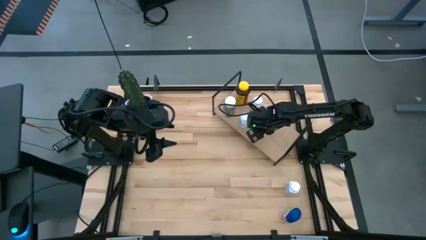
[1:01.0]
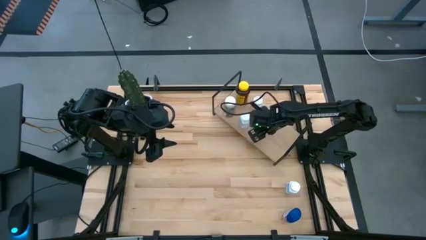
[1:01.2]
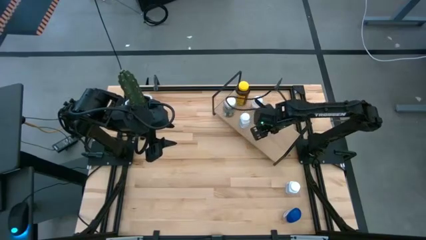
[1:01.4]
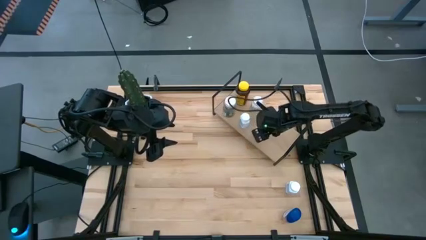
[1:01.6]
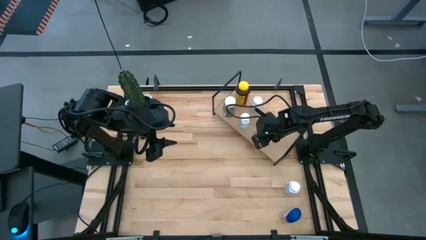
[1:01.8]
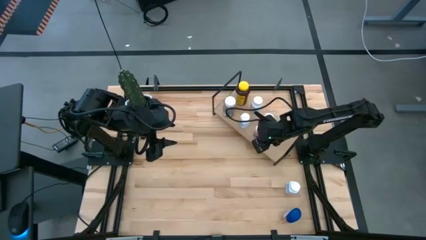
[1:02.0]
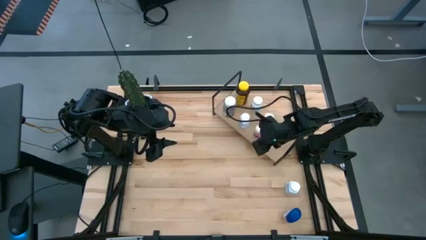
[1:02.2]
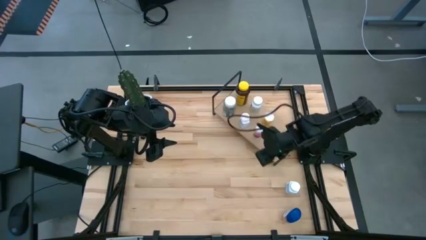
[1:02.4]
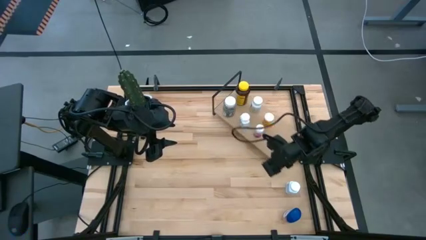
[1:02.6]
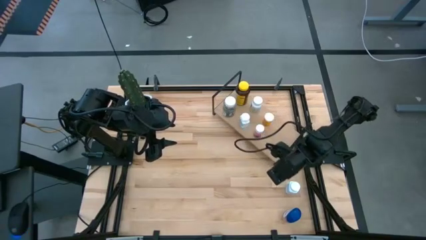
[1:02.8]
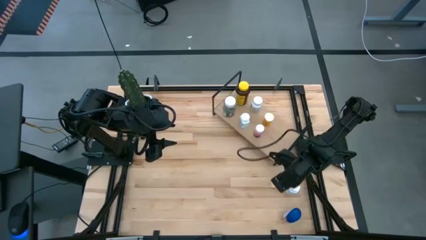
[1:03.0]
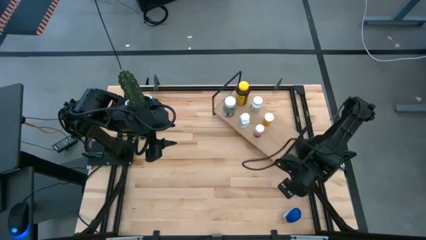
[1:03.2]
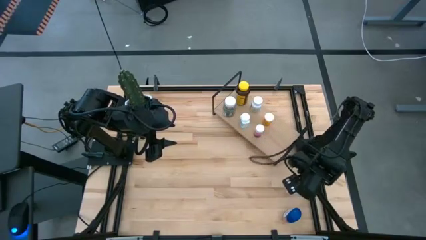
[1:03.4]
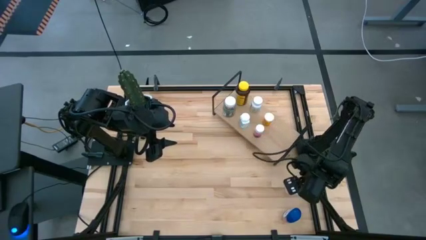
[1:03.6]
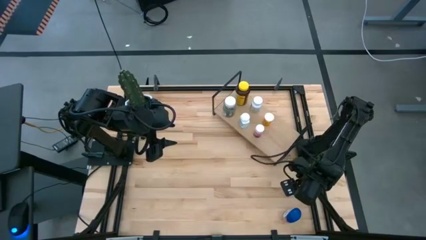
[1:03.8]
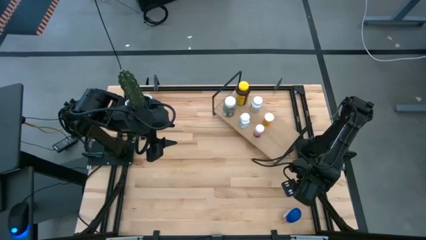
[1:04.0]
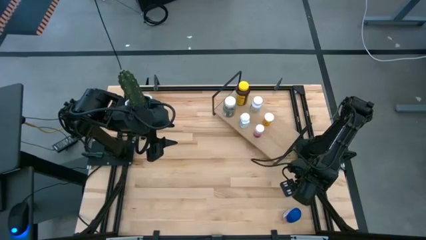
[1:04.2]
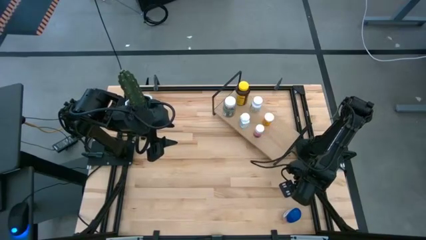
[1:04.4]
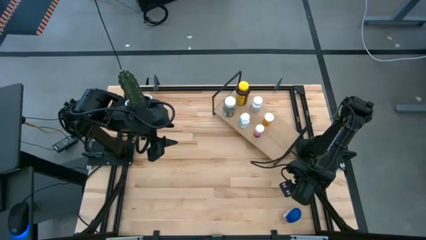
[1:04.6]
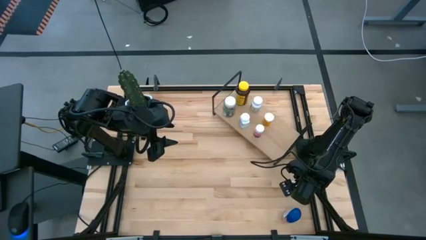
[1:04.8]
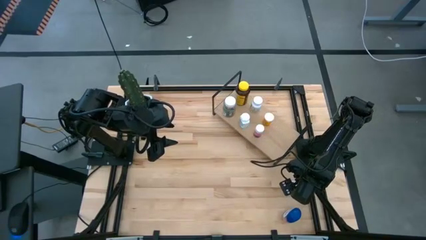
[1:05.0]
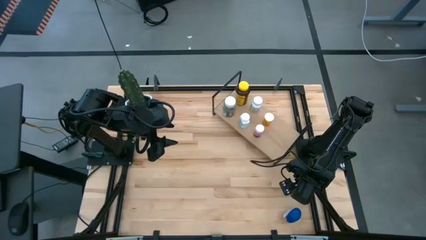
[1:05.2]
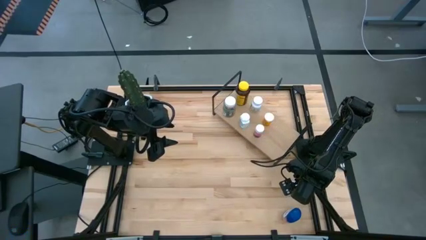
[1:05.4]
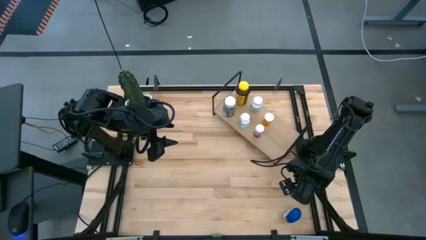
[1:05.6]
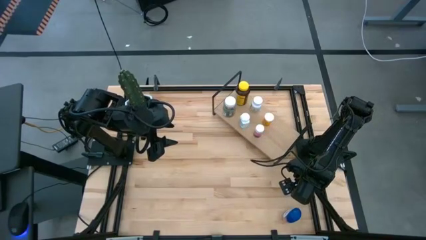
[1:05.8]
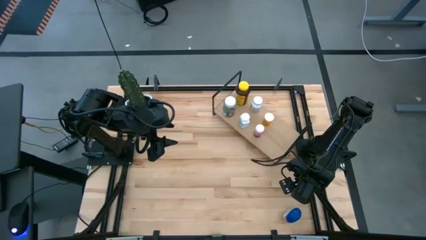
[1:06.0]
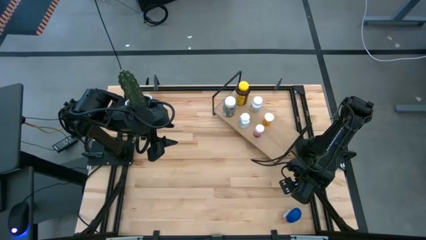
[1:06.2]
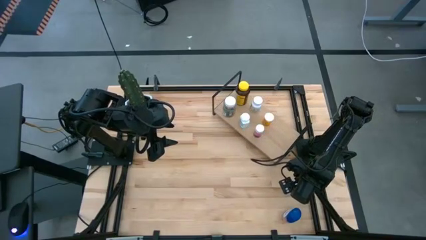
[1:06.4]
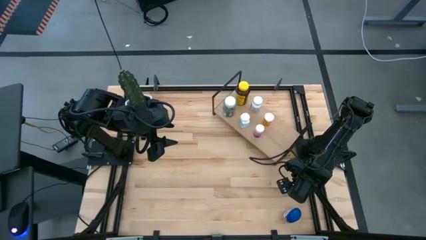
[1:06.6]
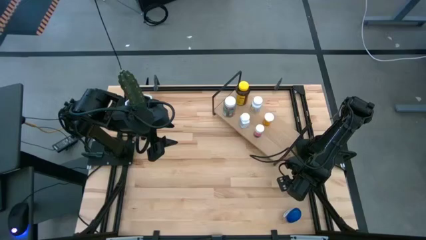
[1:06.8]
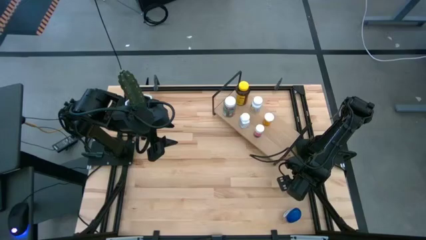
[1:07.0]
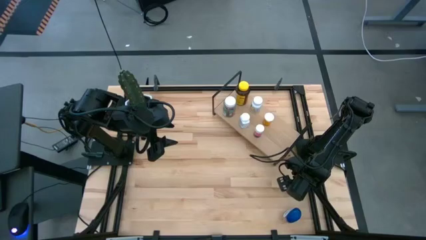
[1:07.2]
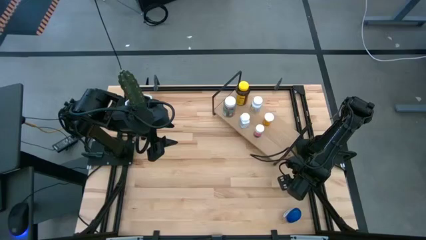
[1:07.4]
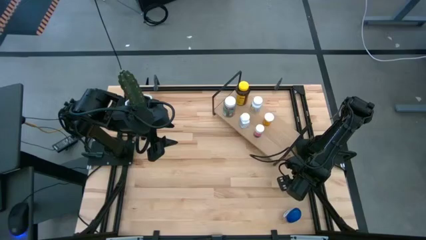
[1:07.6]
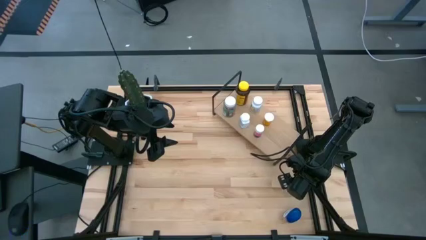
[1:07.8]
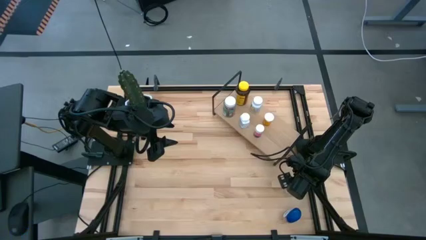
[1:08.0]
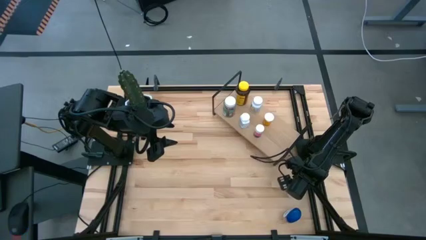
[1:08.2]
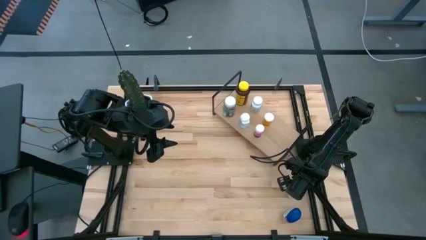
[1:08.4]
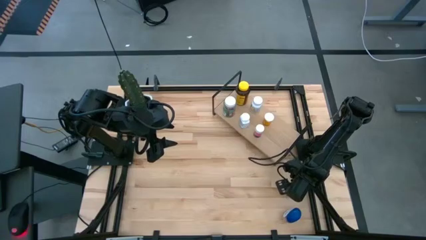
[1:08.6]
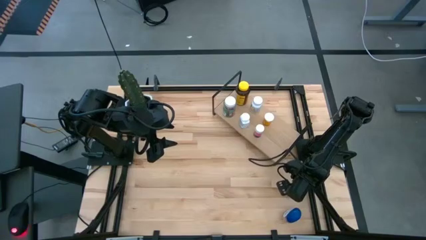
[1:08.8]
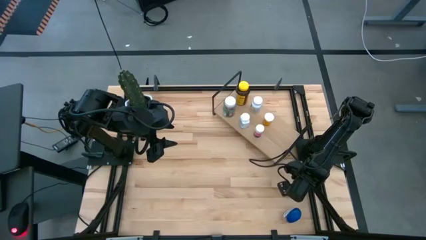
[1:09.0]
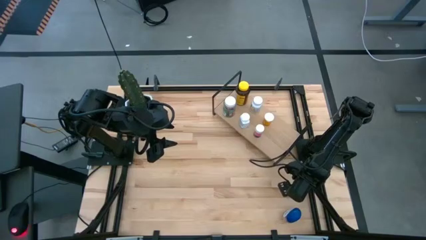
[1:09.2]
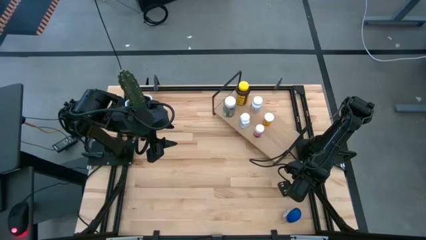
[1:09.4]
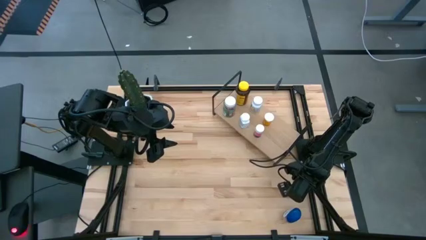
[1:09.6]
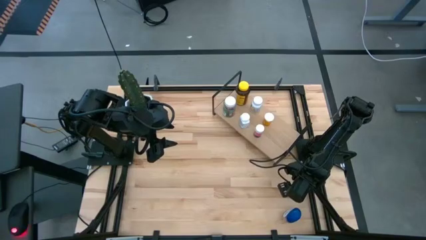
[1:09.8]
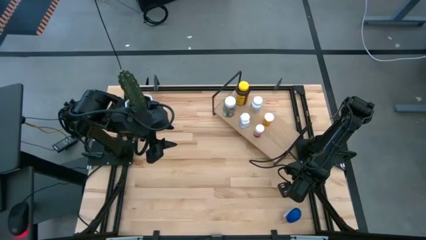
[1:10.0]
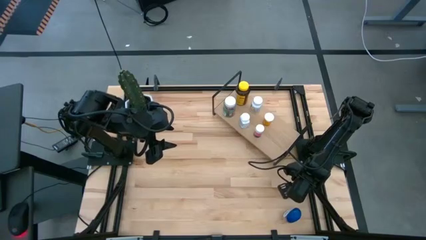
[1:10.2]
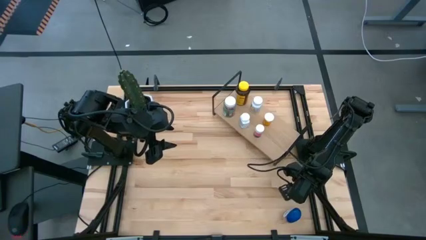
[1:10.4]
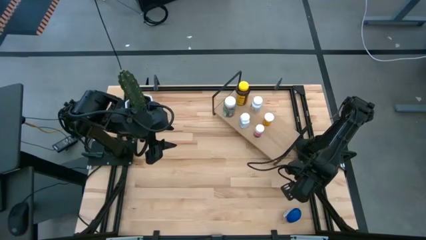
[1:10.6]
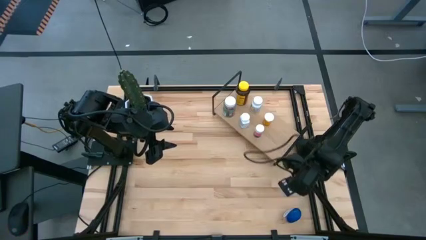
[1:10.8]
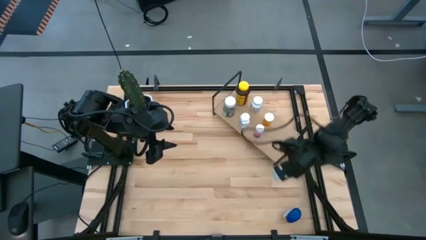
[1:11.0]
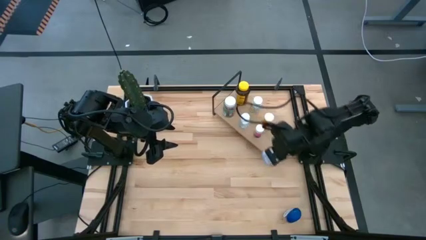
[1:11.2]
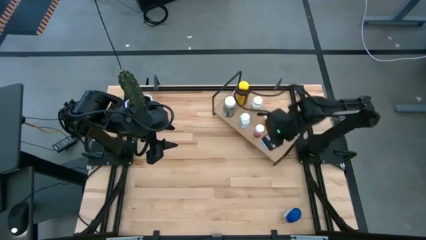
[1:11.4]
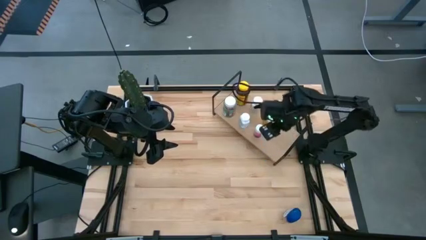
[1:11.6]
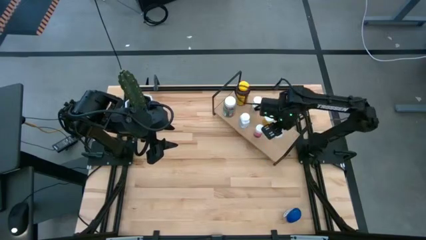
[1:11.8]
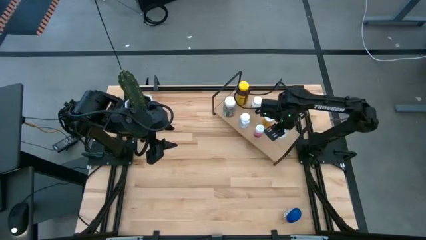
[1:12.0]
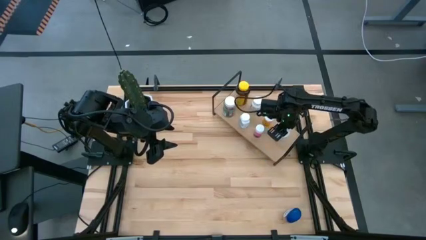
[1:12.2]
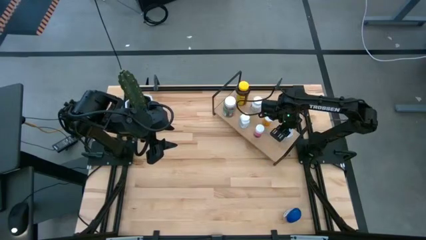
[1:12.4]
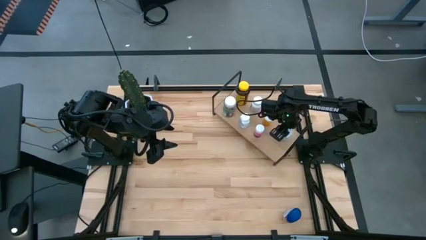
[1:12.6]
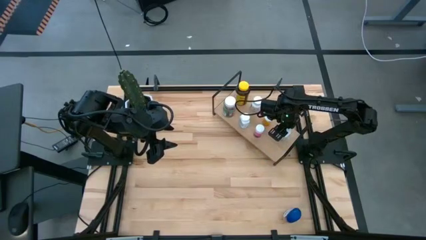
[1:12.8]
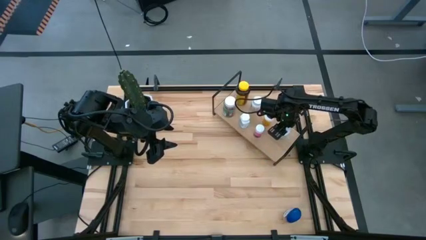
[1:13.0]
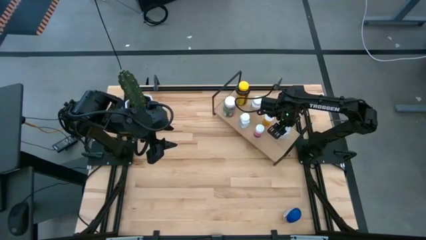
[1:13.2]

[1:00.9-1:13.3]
Task: Pick and place medicine bottles onto shelf by color
Put the light blue medicine bottle on the shelf

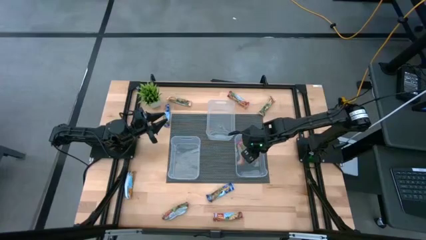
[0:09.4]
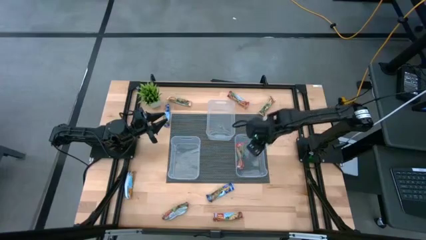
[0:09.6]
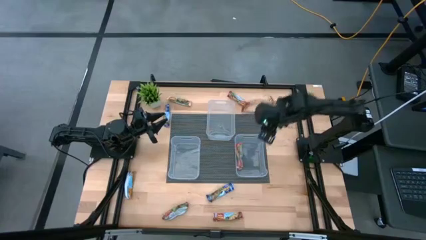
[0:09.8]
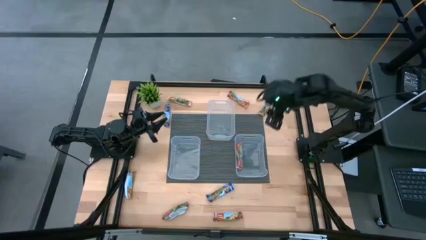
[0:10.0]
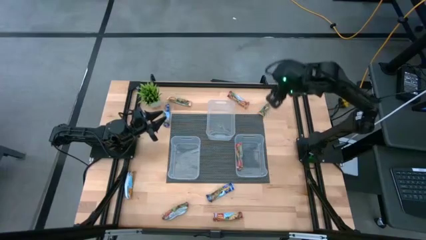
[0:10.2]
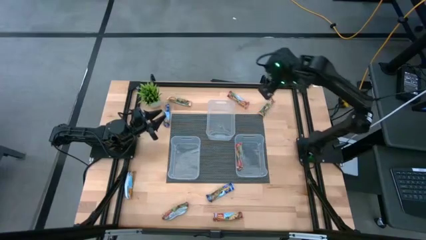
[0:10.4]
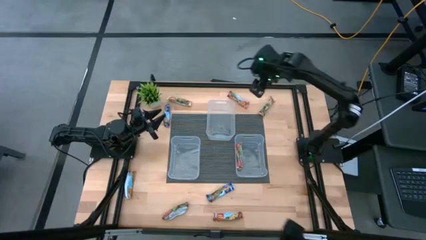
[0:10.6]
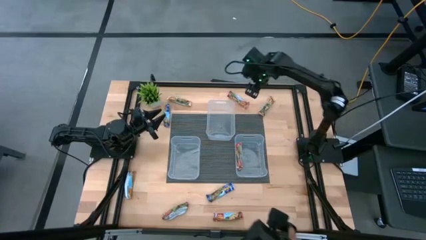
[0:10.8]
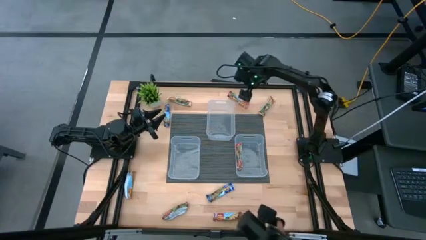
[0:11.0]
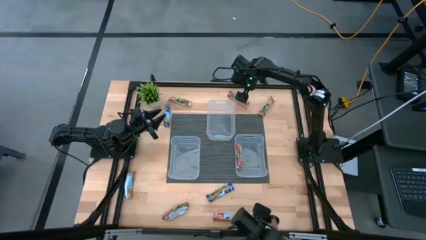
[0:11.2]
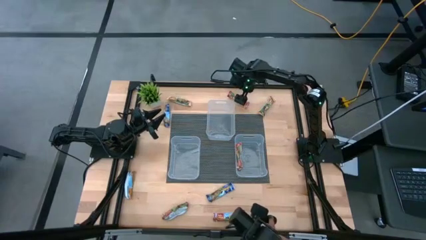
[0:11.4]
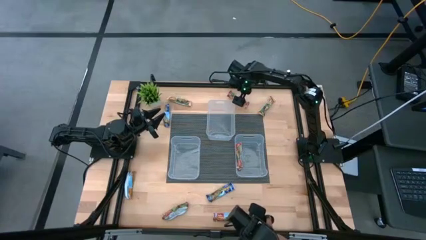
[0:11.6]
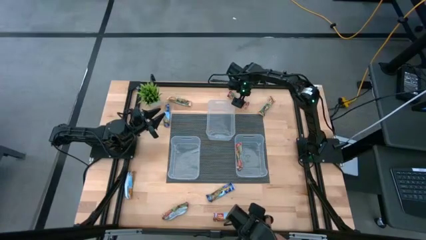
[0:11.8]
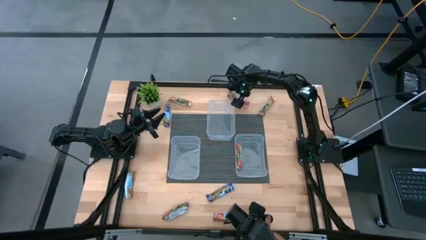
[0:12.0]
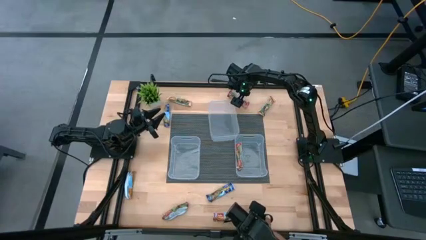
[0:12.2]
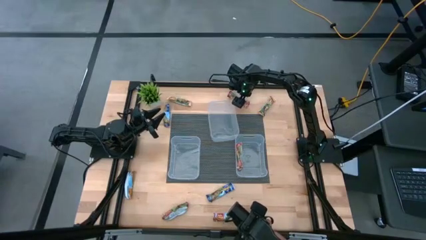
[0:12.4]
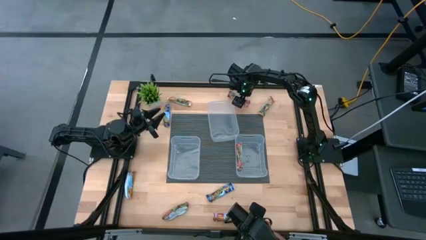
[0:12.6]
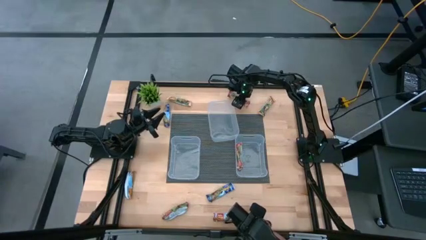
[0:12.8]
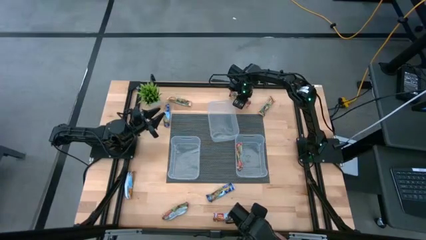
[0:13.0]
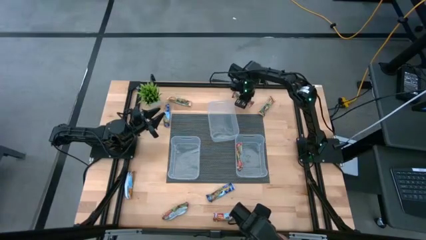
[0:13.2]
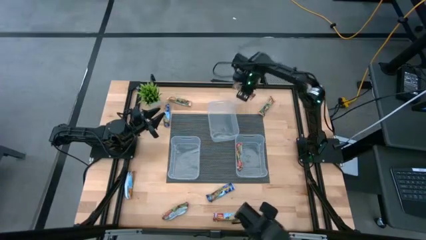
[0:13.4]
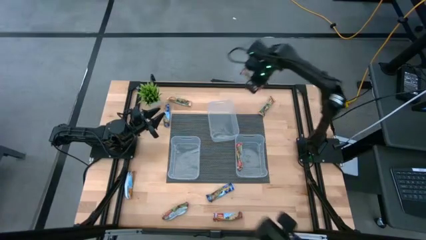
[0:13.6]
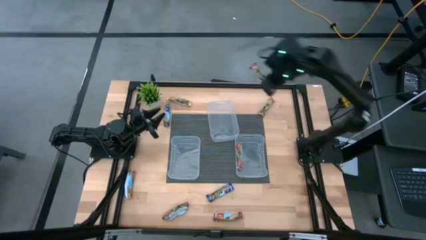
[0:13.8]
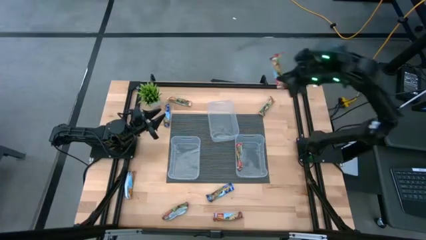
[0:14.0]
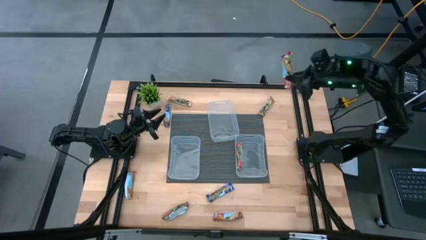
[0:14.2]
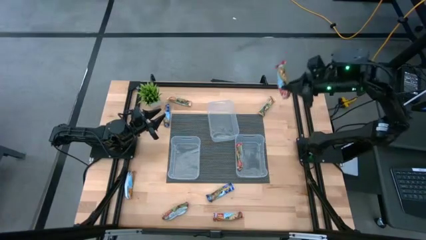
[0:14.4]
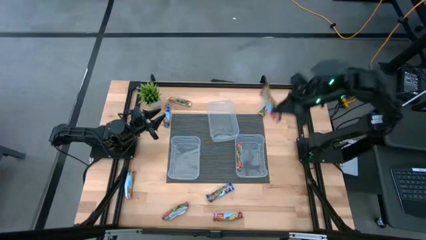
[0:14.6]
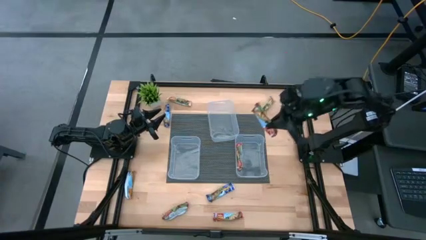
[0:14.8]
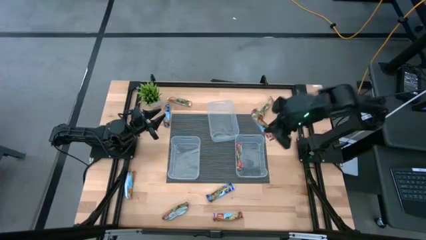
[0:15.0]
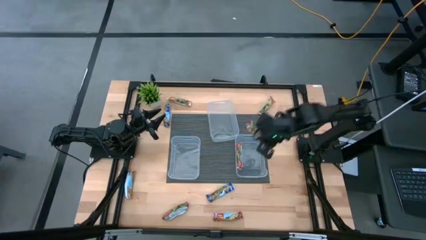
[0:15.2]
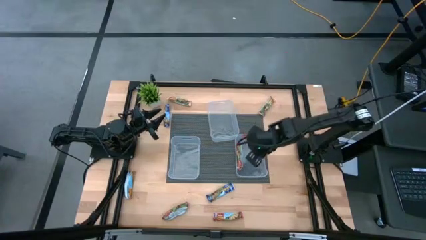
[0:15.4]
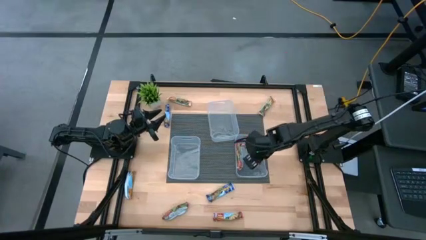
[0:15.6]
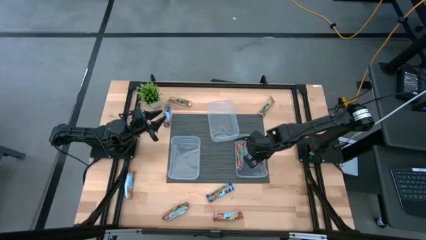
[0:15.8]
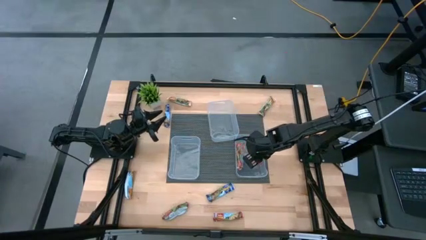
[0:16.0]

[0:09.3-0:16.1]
Task: Pick and place Granola Bars by type
Put the red granola bar into the bottom right transparent bin
